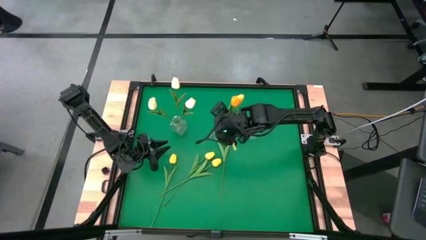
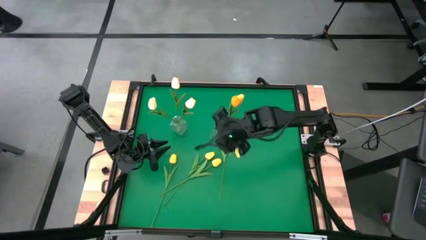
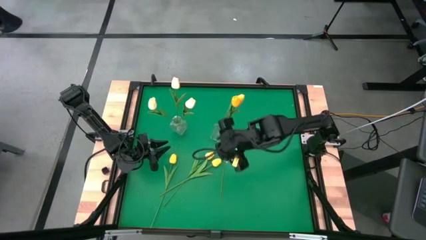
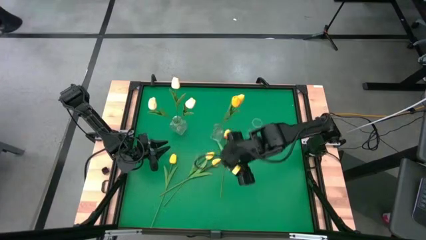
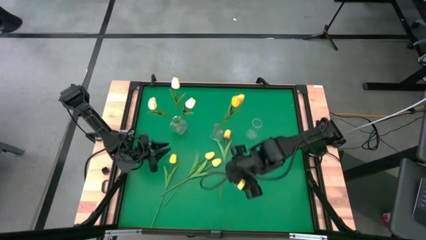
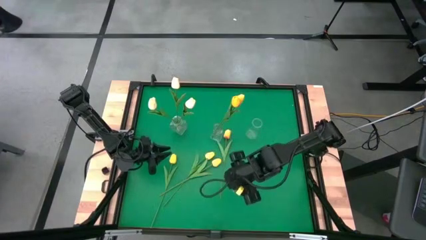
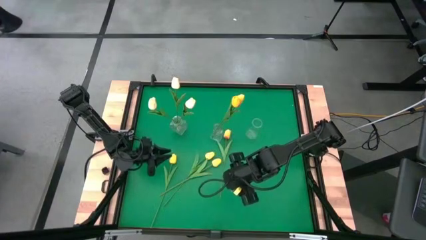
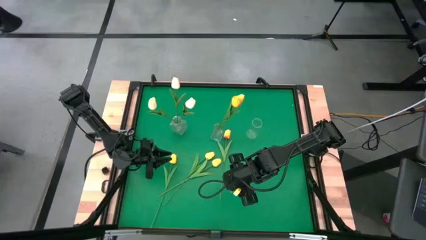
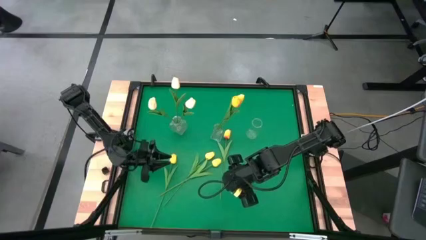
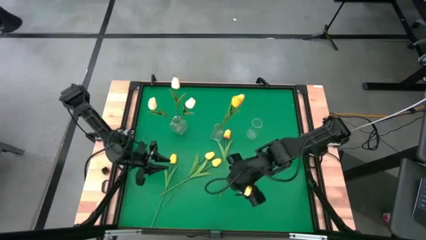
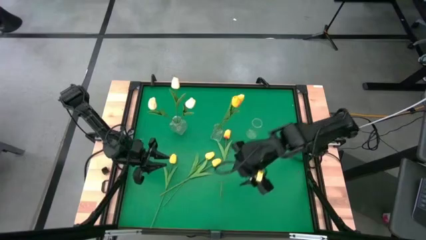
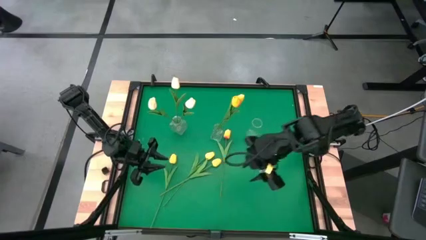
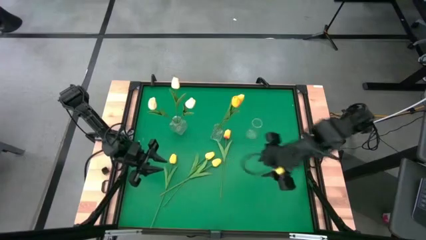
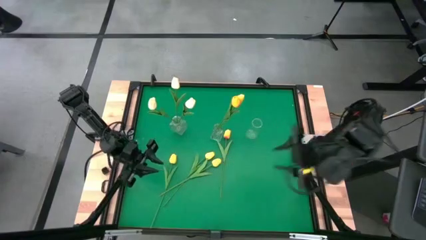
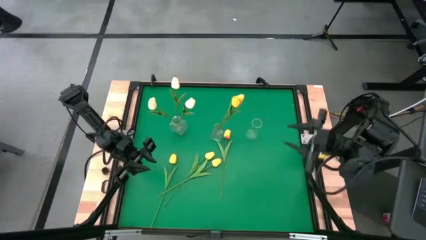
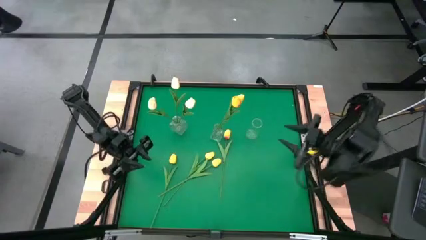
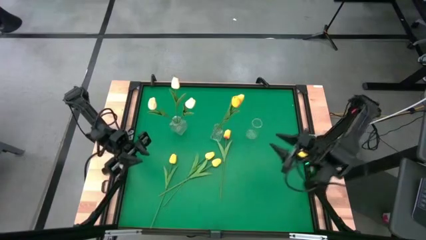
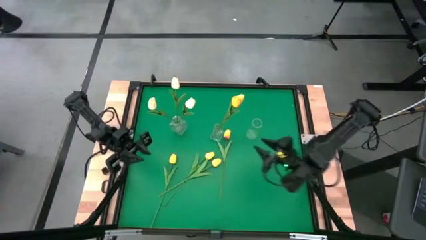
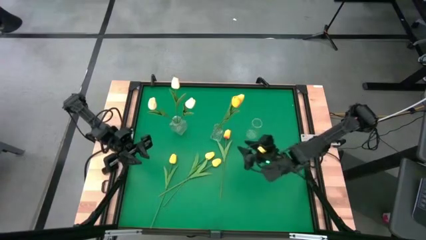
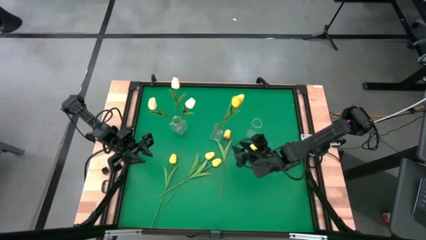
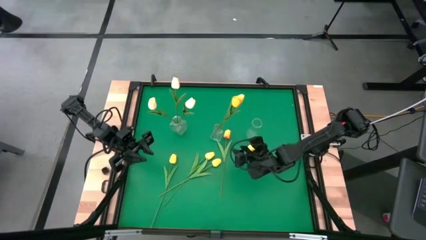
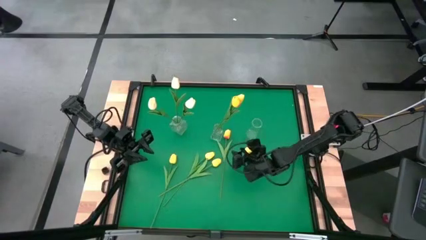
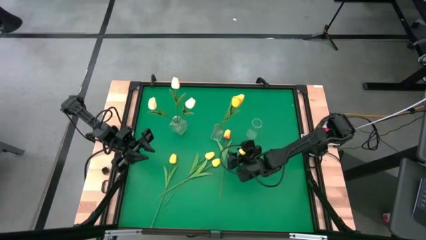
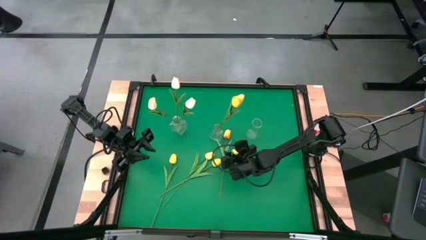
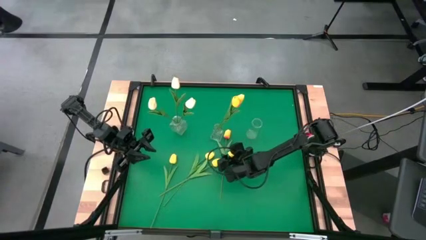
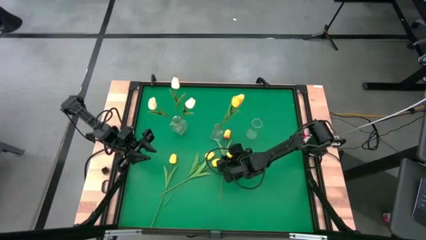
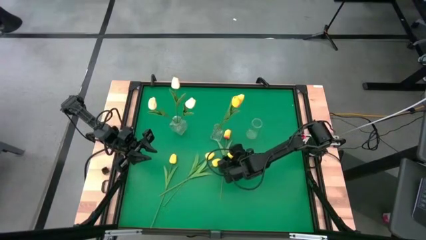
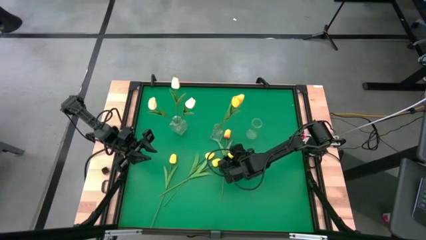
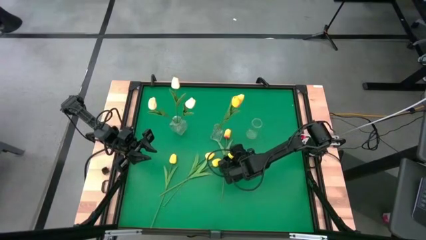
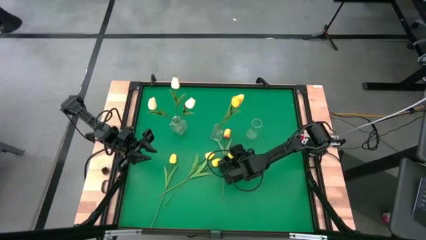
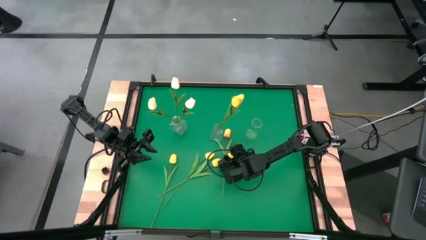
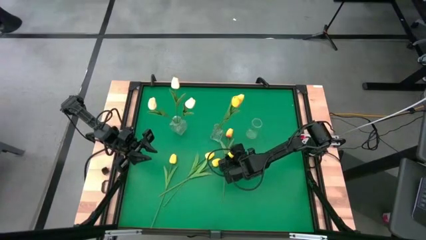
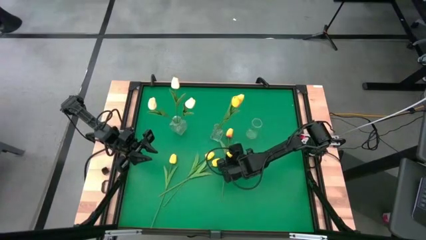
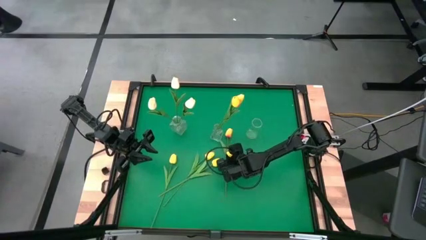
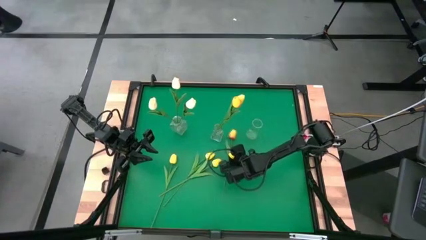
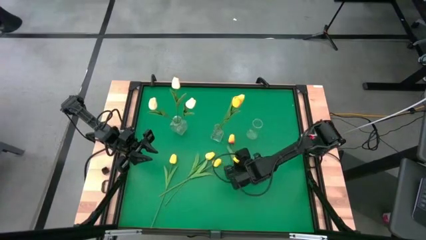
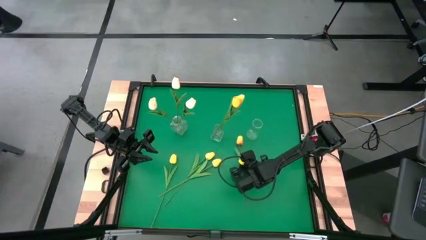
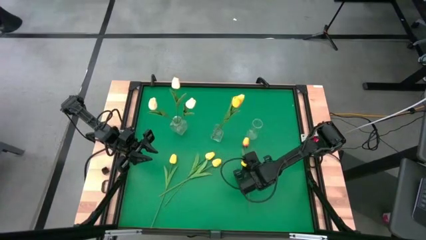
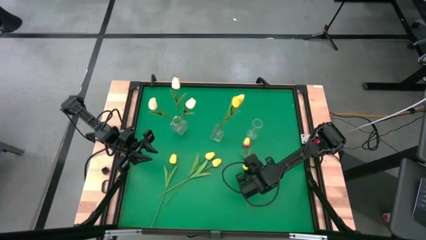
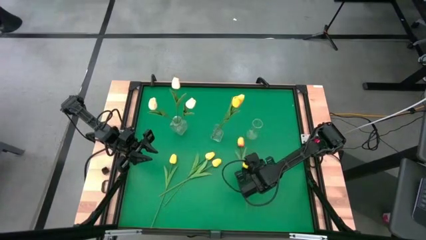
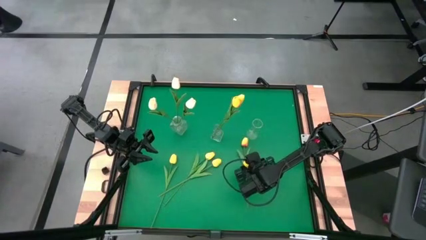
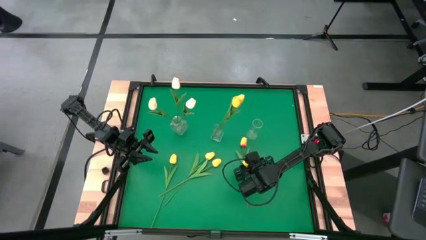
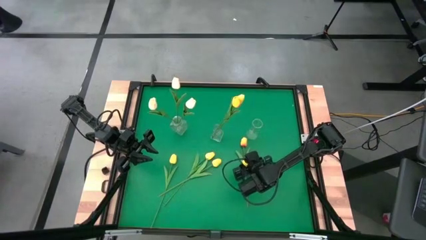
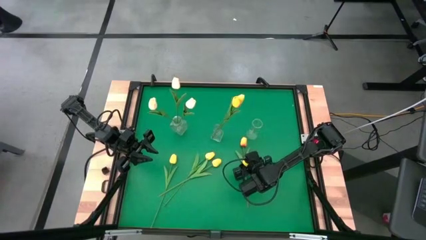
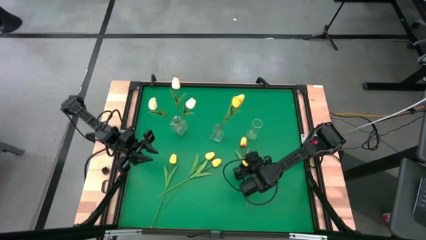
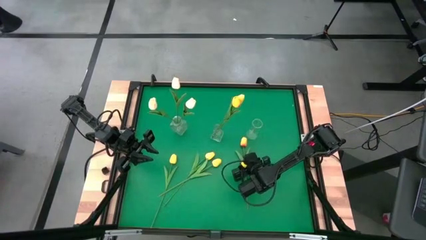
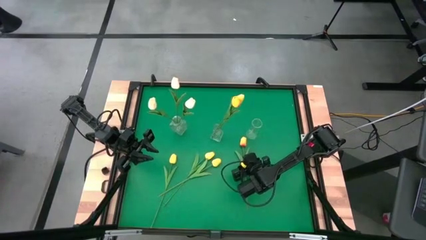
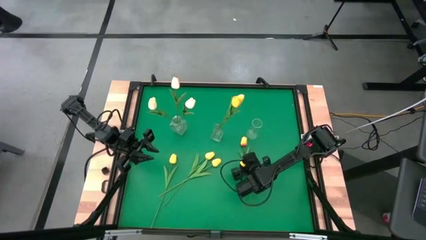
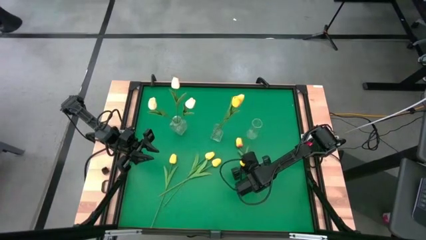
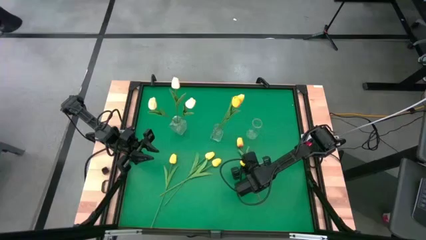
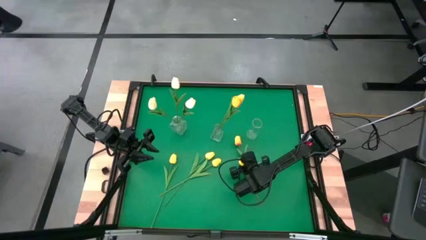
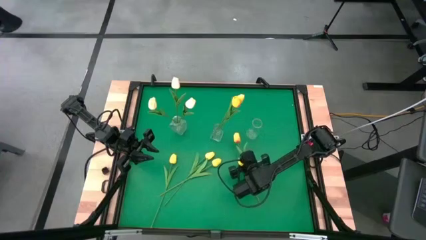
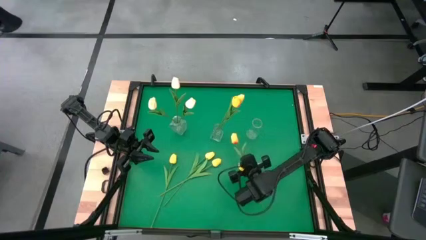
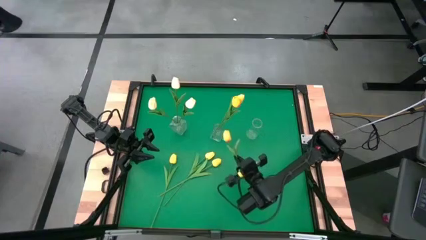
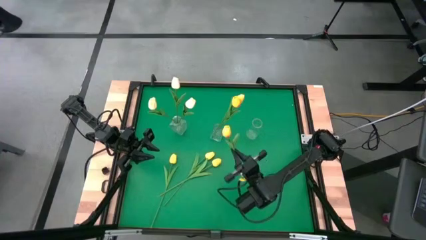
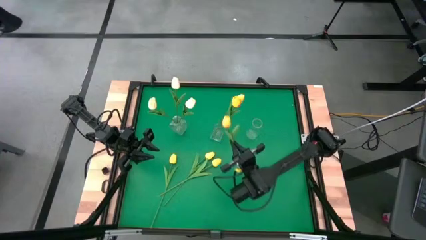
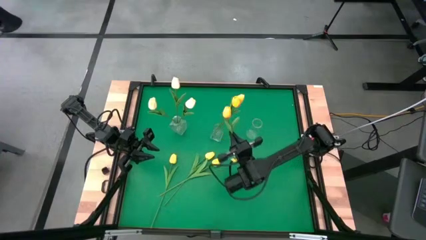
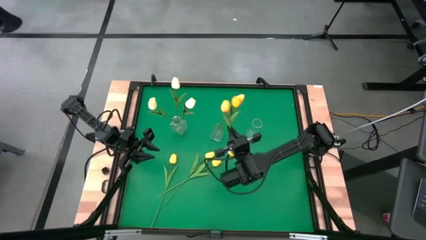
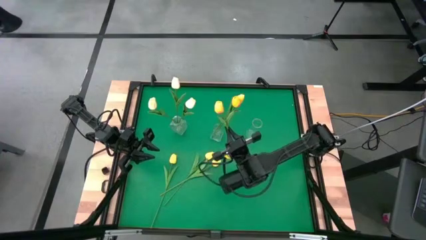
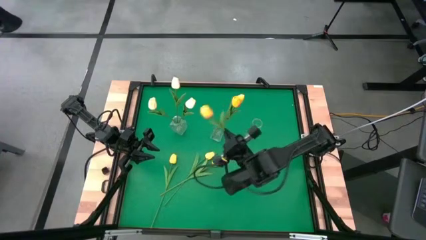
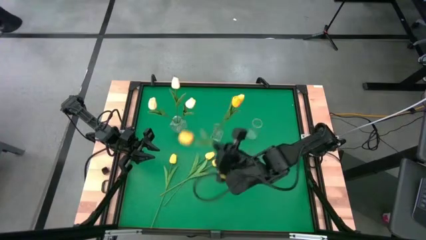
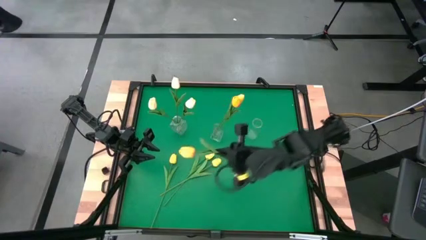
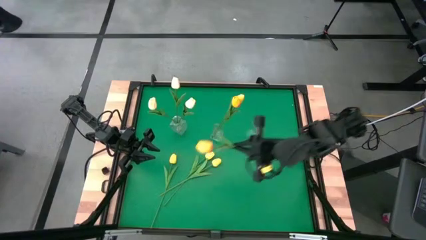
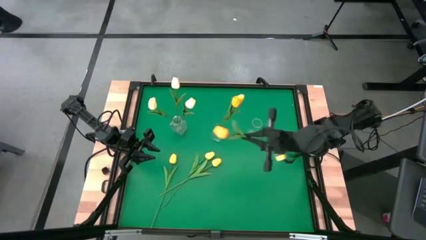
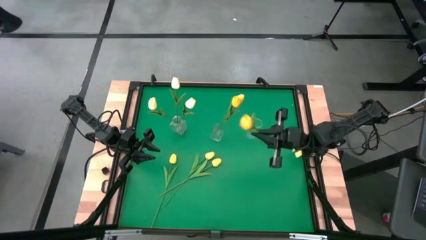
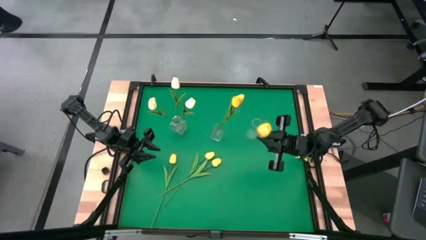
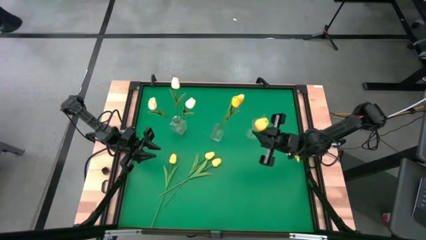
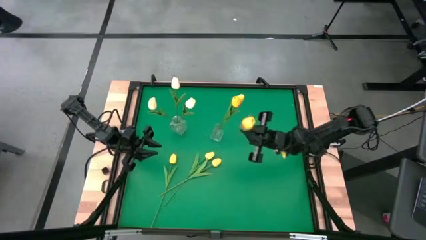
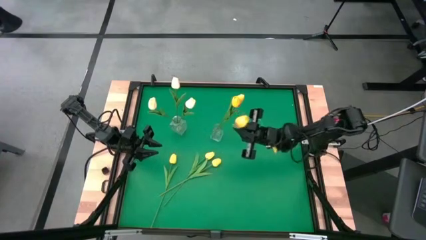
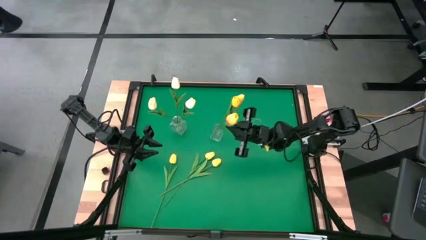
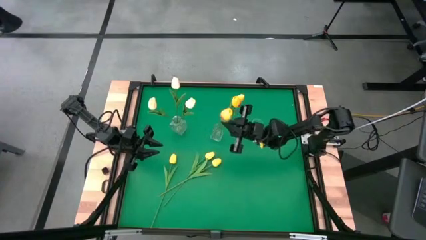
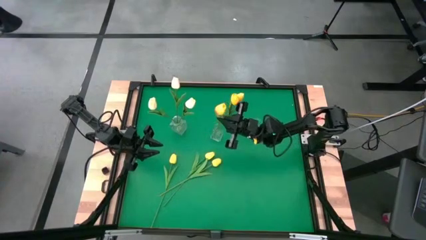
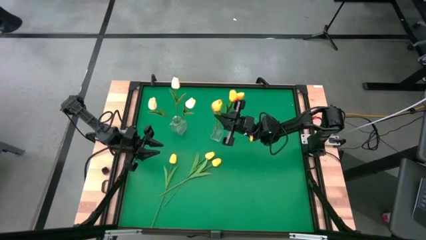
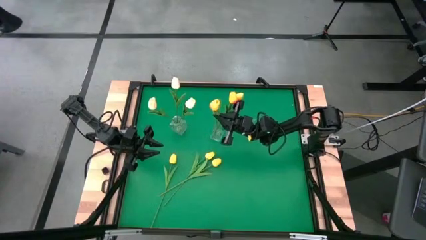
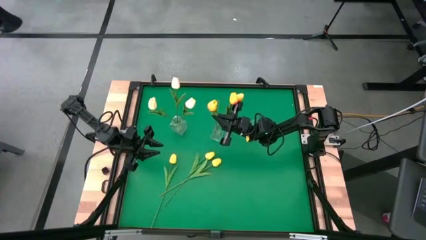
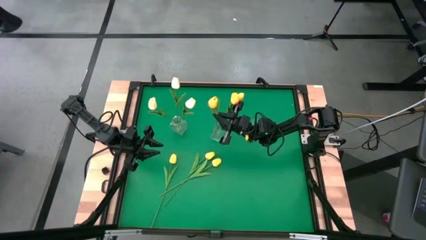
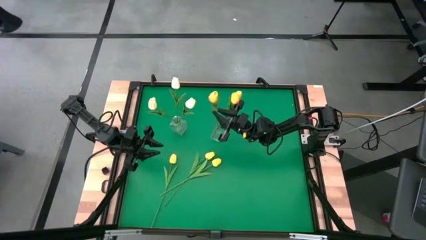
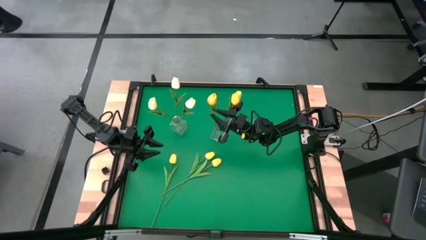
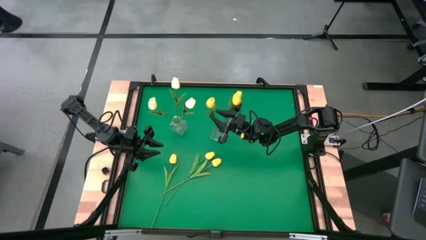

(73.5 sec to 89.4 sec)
Task: Sort flowers into vase by color
Put the yellow red flower into the middle transparent vase

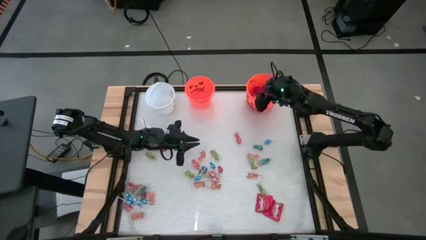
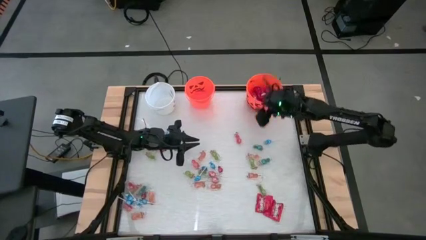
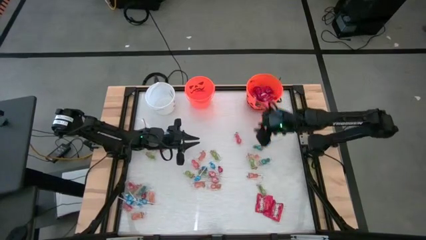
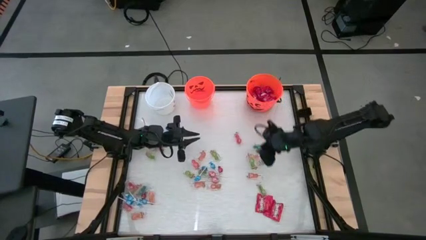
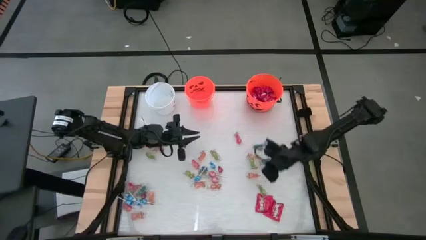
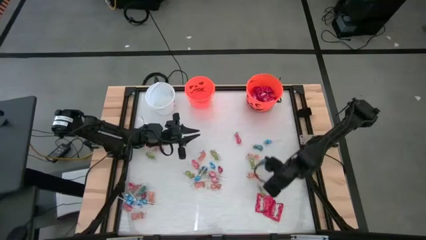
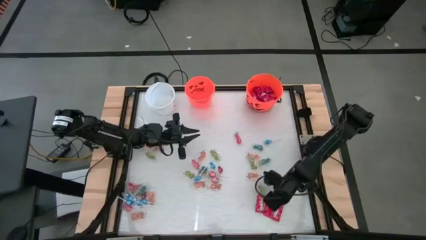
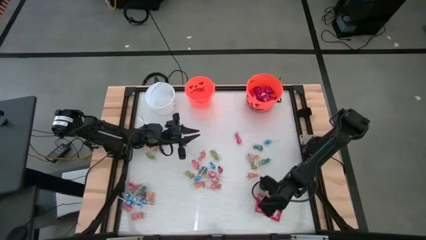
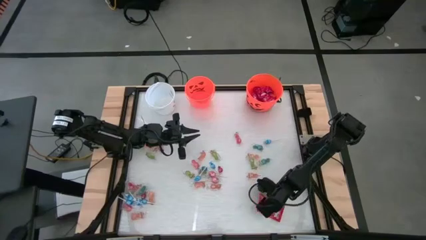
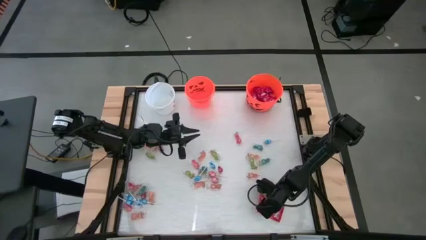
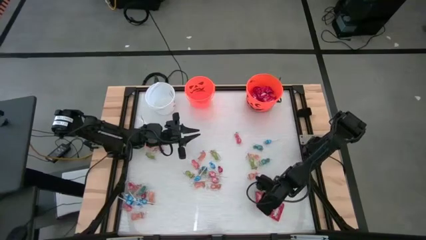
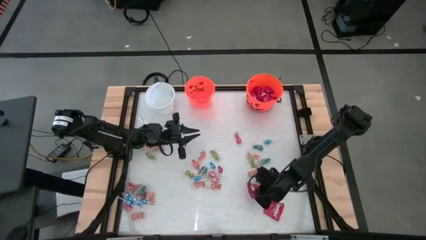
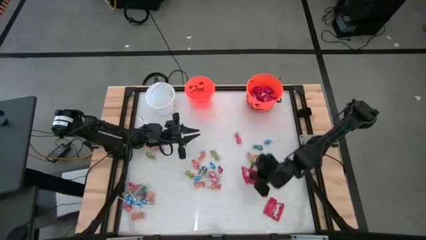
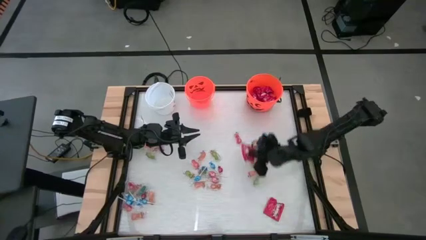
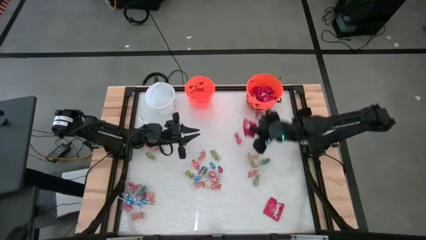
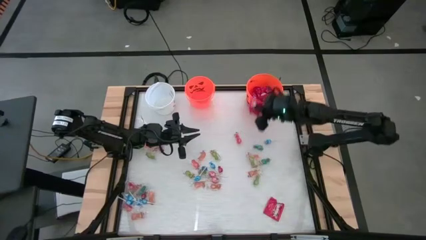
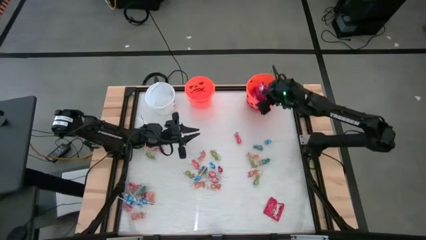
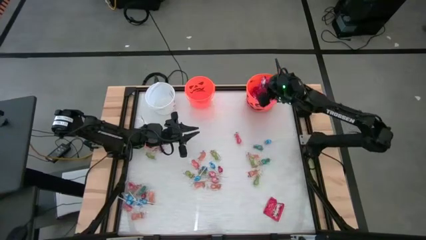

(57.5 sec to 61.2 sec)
Task: Sort candy by brand, put in halloween buckets
Put the red candy into the right orange bucket
